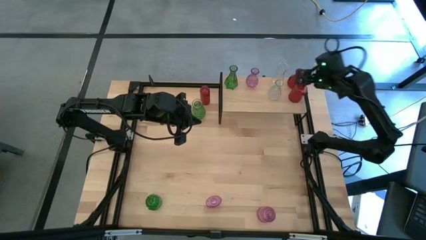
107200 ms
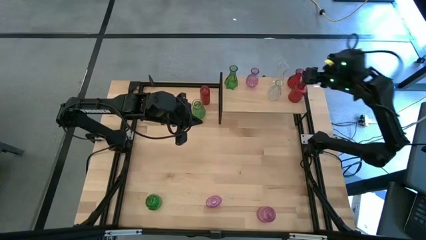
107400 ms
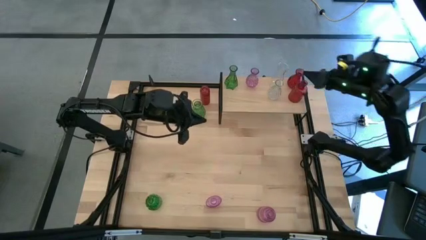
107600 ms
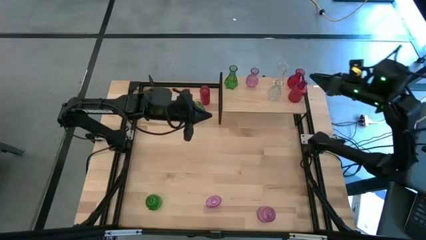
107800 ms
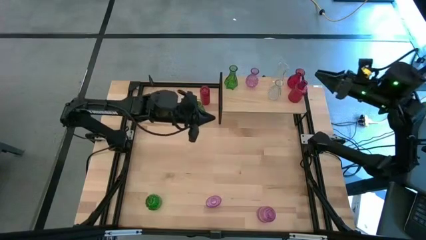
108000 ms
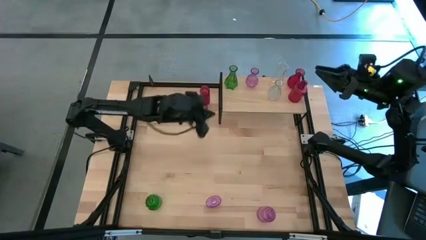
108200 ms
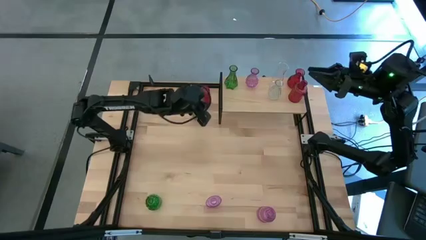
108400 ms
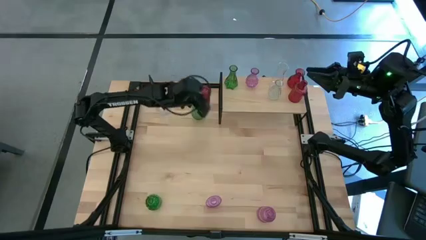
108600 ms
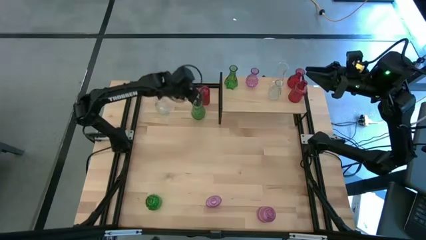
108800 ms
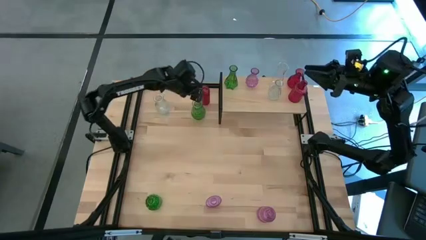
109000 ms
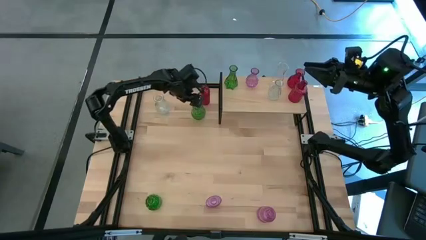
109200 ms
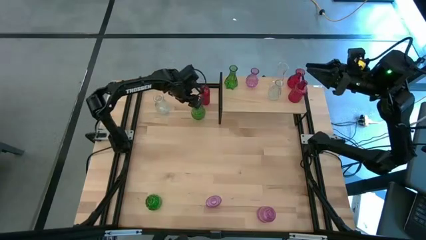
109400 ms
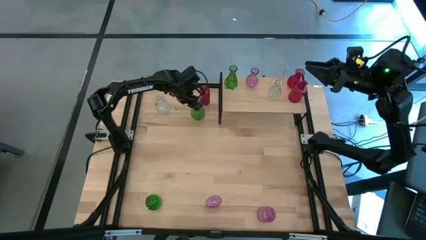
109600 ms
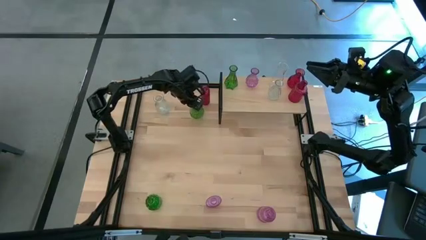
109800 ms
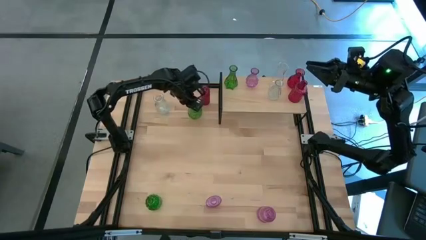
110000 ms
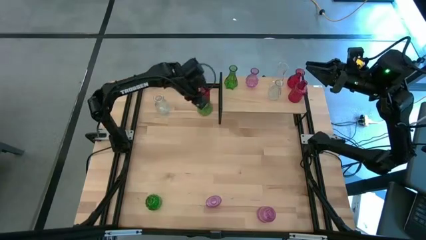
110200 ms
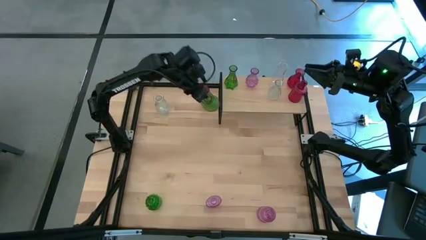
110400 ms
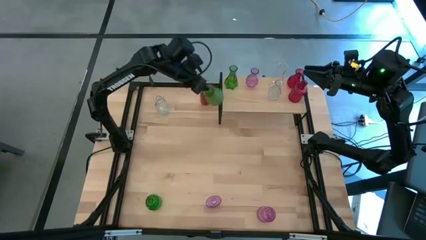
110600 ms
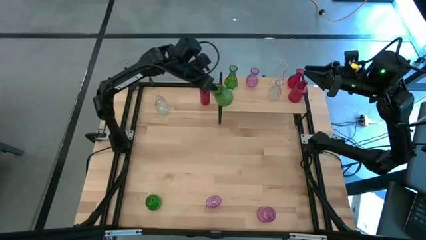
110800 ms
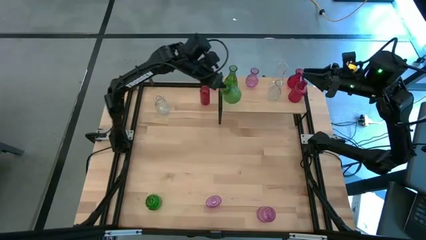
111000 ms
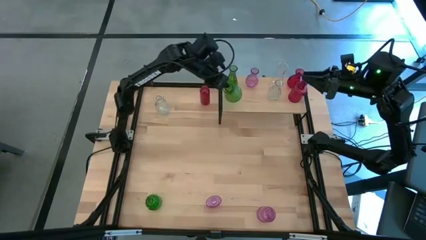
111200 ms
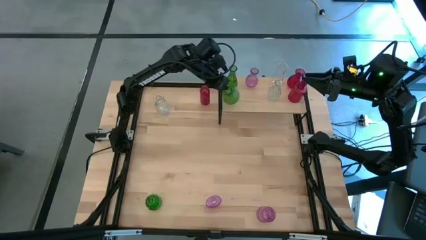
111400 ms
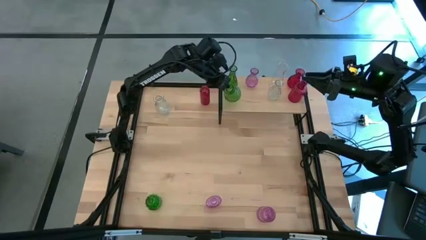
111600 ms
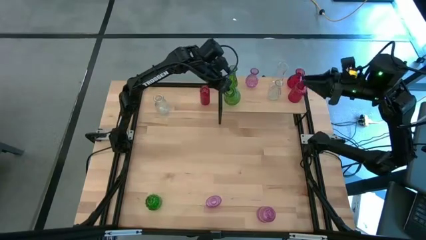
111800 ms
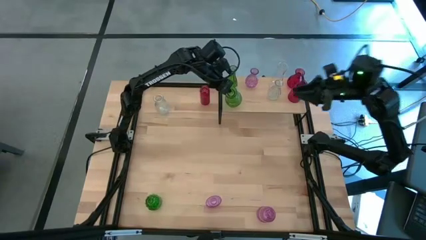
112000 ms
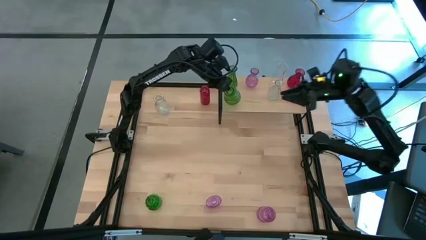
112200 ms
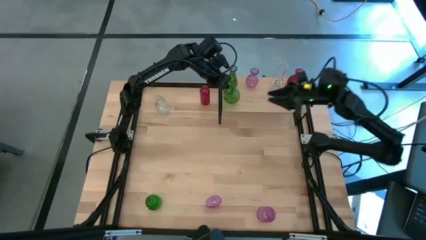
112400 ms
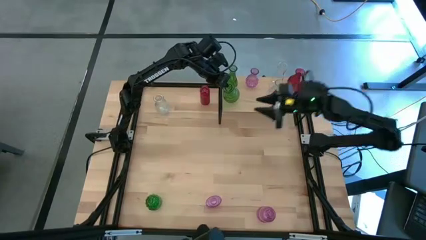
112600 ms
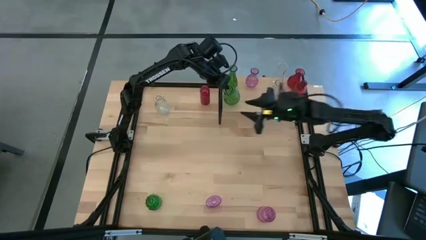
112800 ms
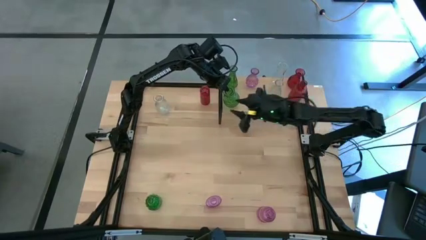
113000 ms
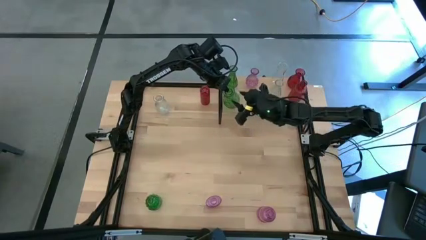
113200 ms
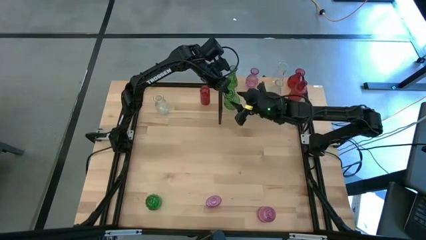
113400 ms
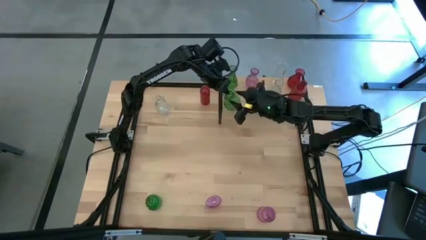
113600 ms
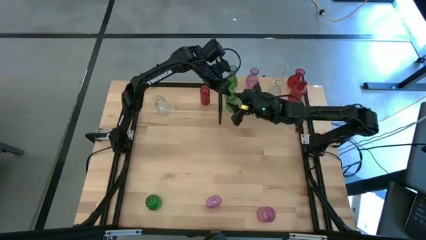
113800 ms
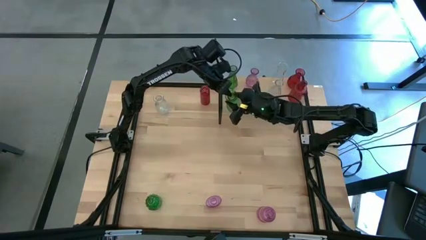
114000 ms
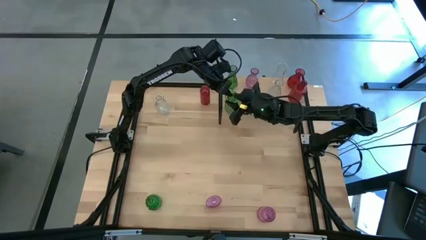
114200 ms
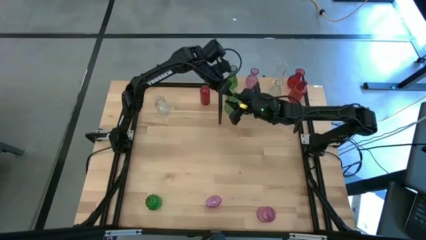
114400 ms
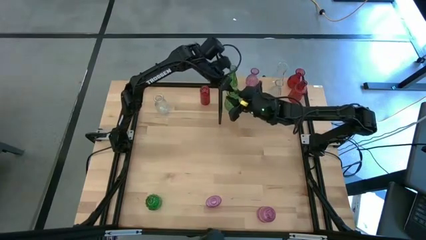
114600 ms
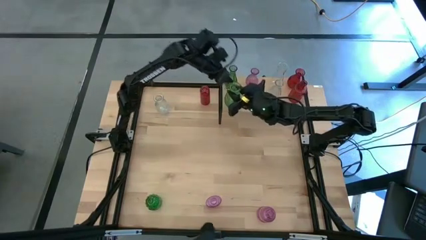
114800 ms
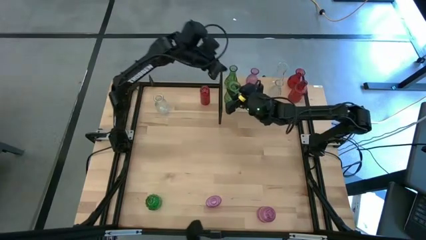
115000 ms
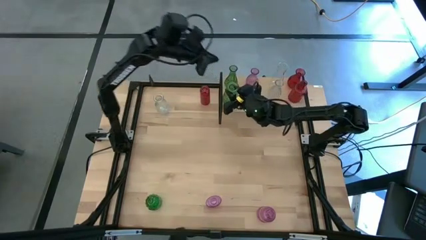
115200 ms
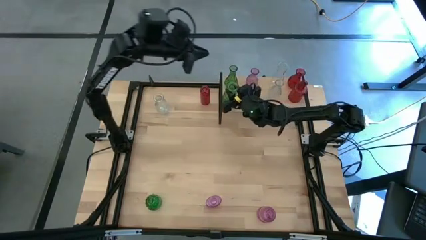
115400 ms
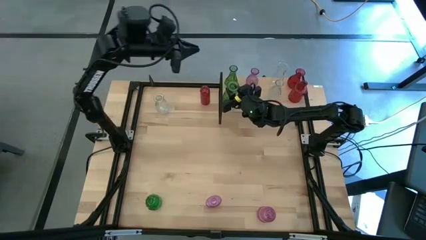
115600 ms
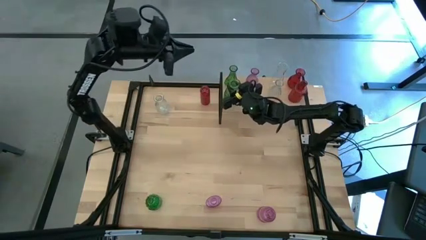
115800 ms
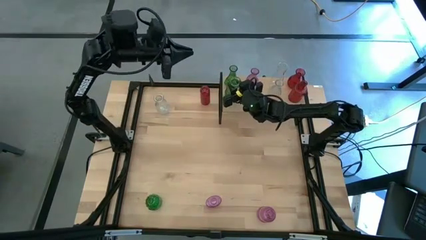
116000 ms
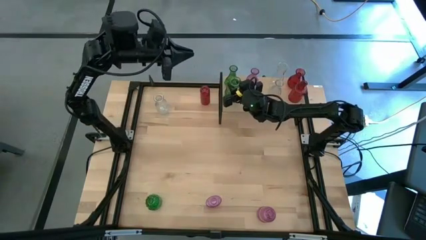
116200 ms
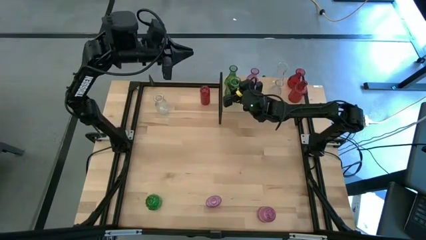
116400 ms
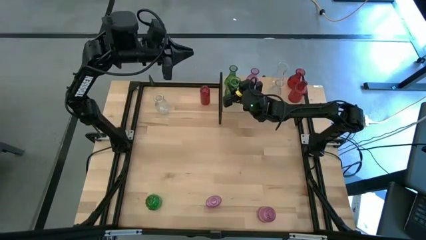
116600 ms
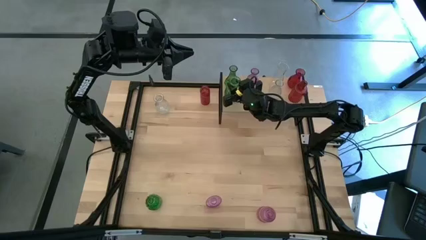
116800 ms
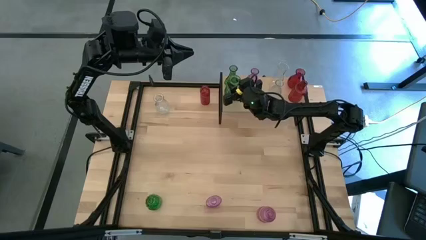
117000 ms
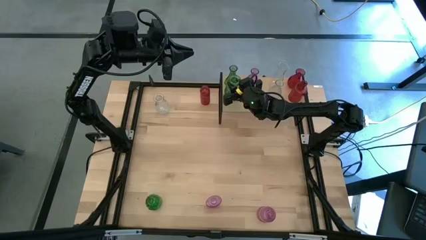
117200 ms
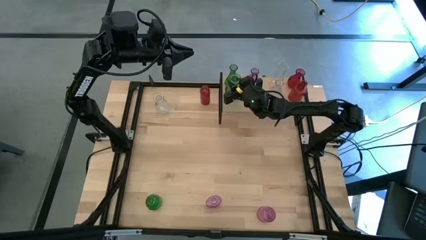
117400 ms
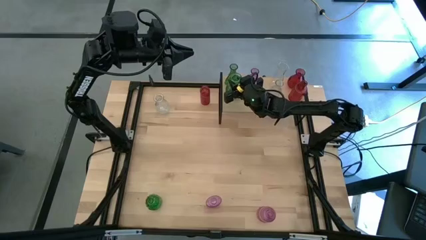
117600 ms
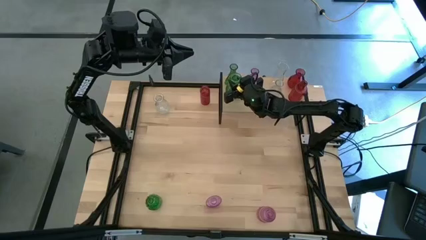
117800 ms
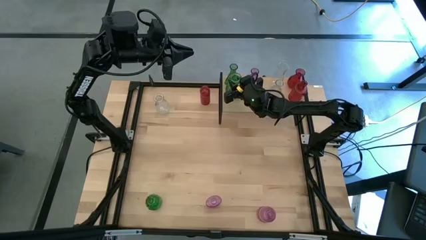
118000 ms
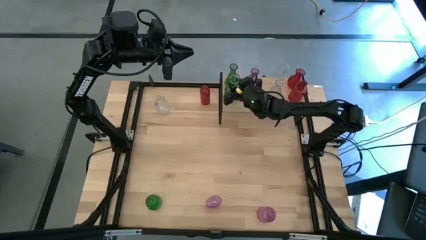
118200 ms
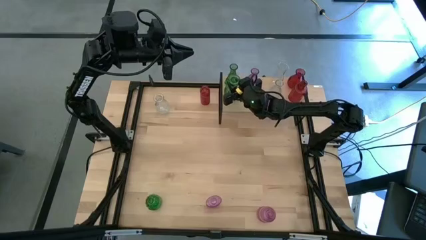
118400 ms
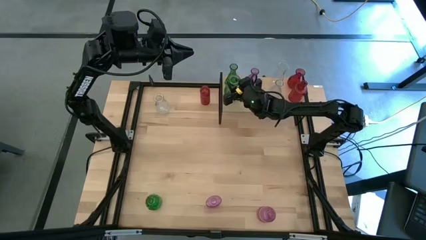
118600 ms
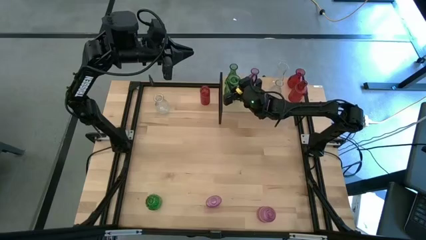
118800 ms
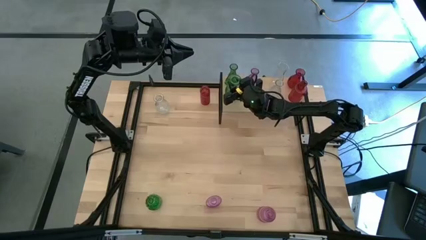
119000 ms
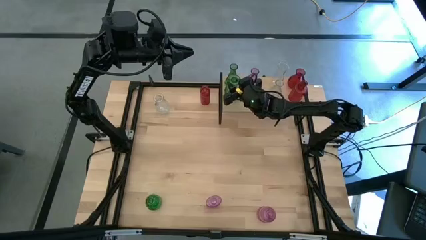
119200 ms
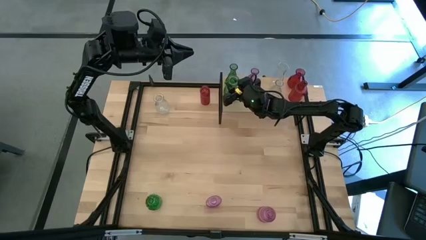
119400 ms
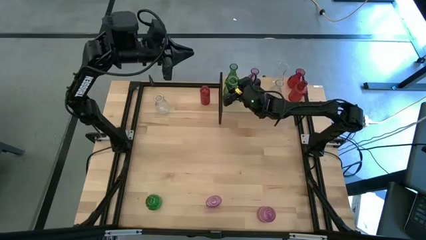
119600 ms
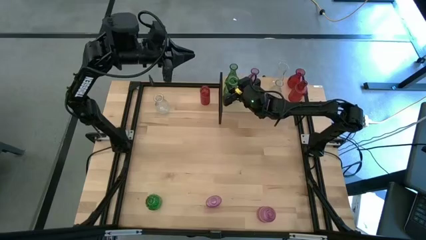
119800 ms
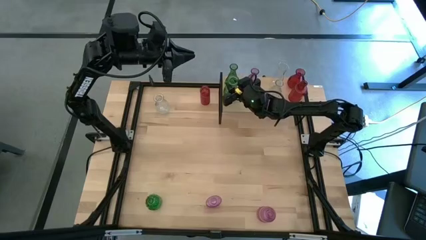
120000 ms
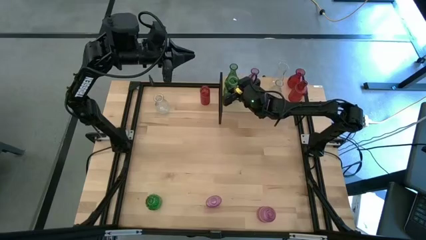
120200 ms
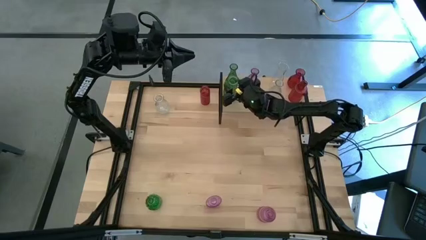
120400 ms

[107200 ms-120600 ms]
Task: sort vases onto shelf
Put the top green vase on the shelf aligned with the other green vase

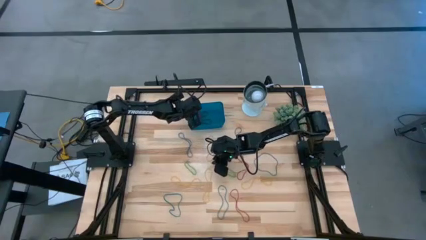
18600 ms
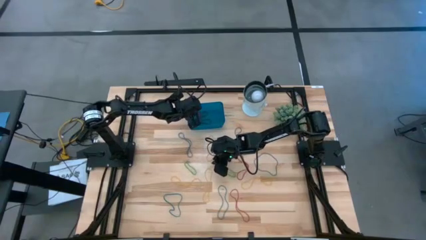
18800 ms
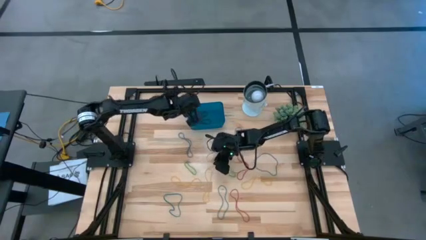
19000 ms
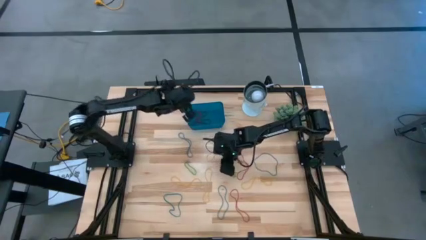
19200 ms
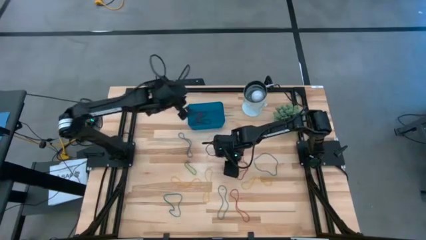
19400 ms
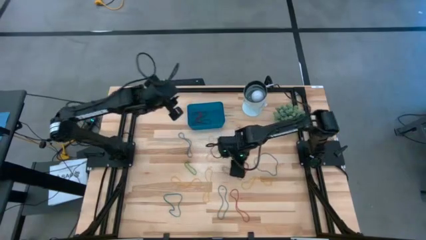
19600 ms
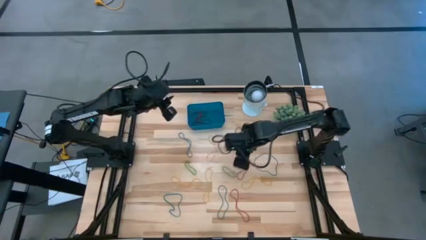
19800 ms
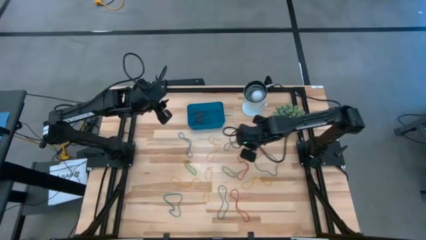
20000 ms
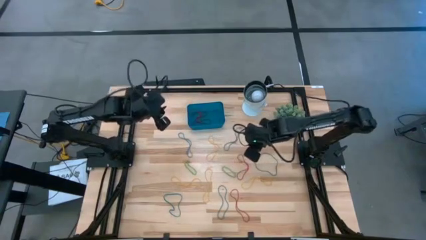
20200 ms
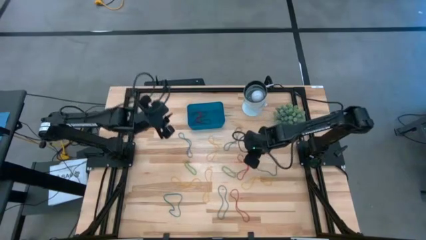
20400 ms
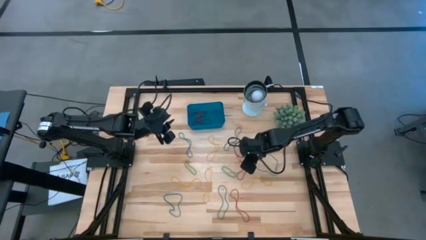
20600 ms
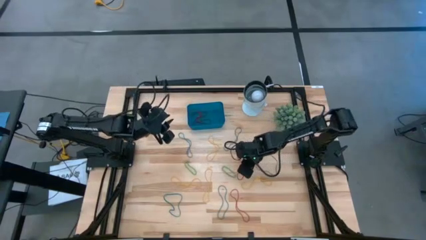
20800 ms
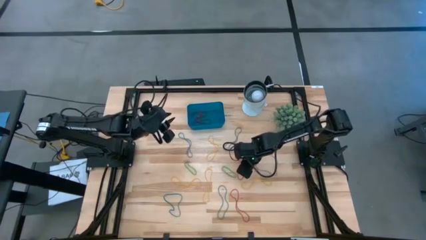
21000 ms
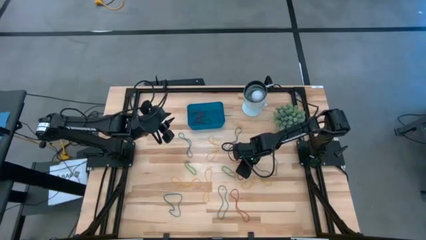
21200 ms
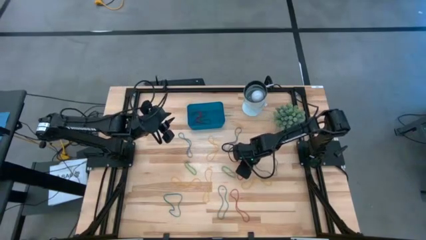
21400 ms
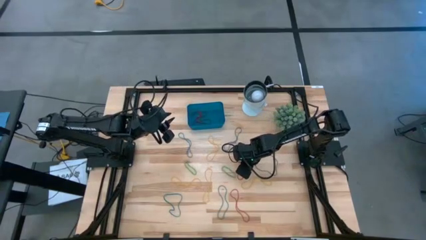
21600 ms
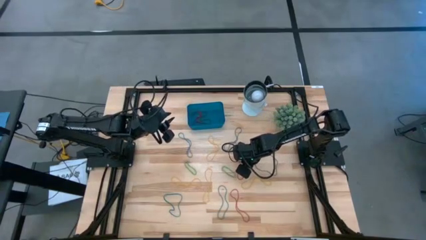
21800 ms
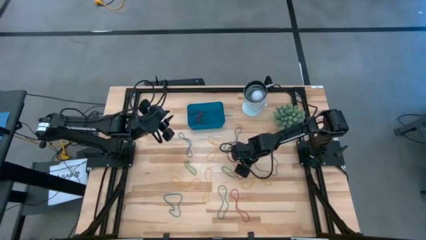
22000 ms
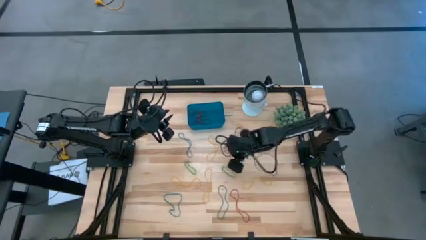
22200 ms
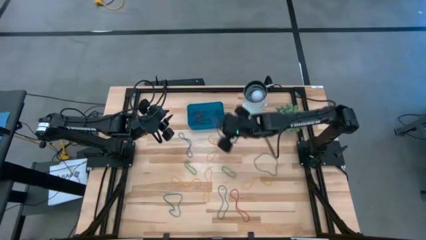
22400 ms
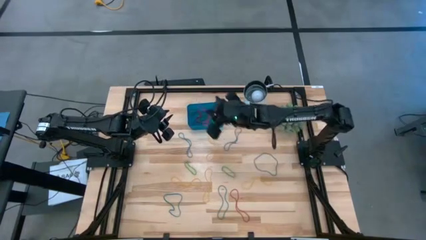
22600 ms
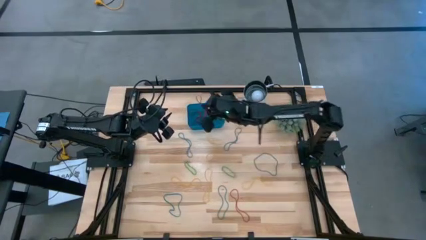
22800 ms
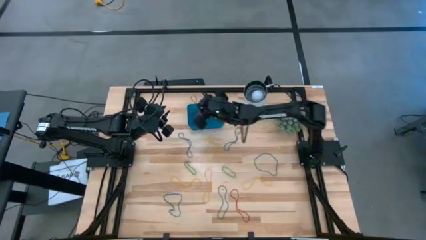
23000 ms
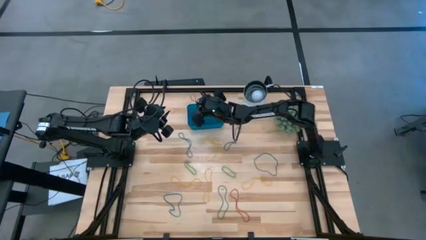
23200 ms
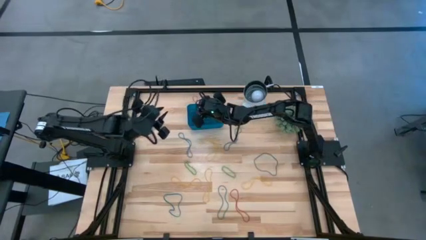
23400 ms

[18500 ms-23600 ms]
Task: Pick and place items into bin
Put the red rubber band into the blue bin
